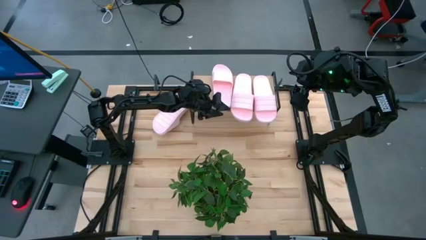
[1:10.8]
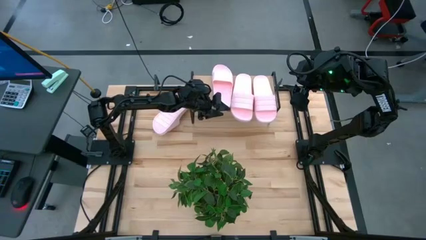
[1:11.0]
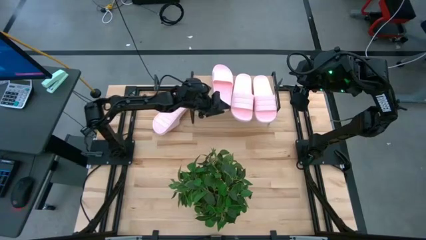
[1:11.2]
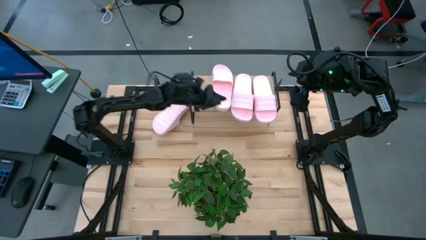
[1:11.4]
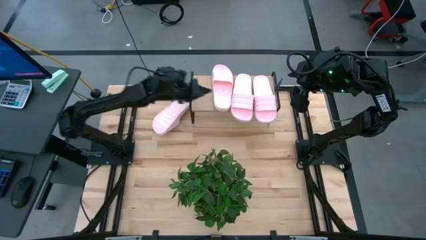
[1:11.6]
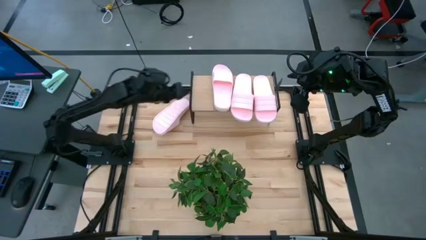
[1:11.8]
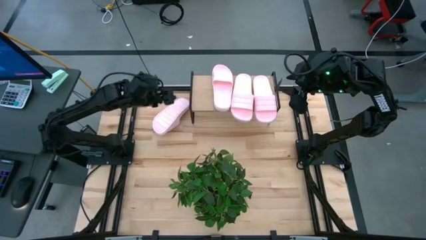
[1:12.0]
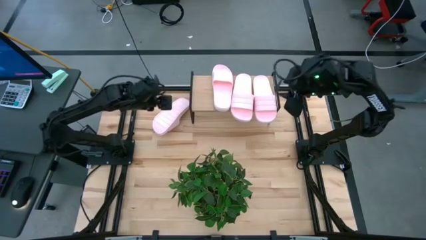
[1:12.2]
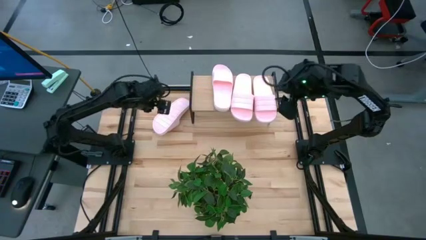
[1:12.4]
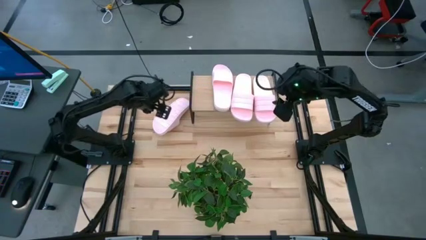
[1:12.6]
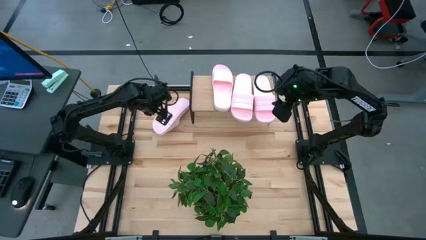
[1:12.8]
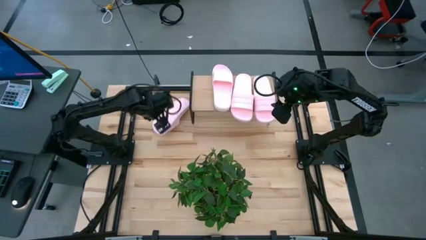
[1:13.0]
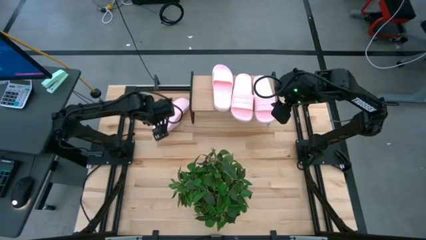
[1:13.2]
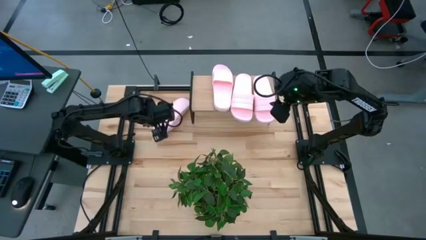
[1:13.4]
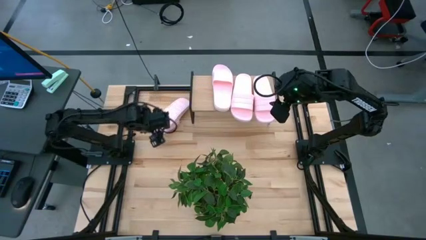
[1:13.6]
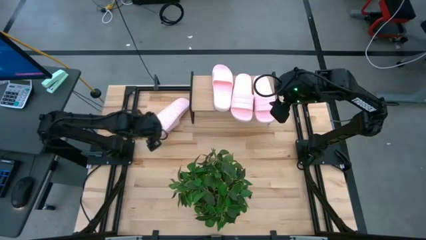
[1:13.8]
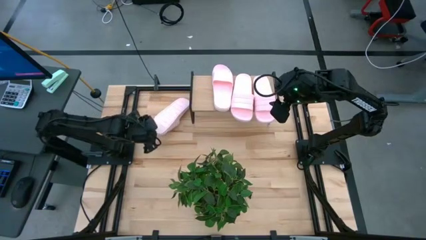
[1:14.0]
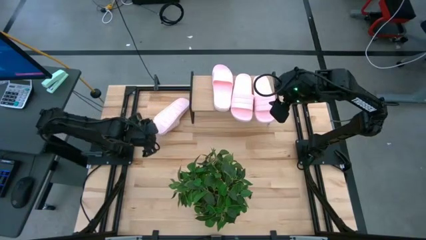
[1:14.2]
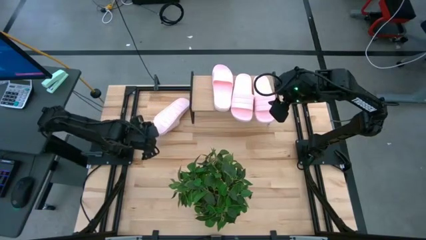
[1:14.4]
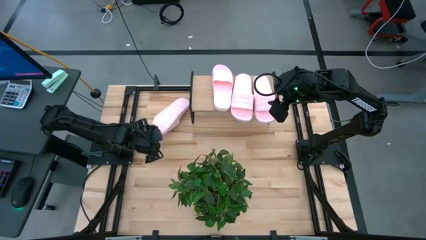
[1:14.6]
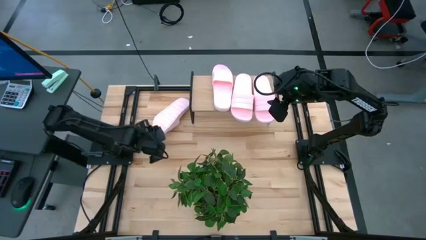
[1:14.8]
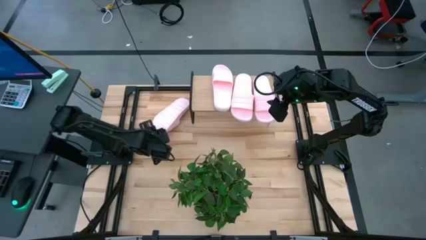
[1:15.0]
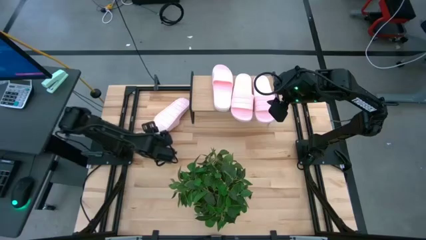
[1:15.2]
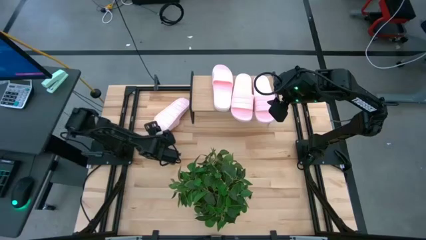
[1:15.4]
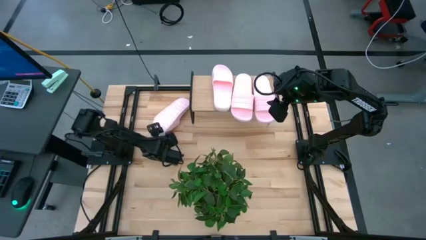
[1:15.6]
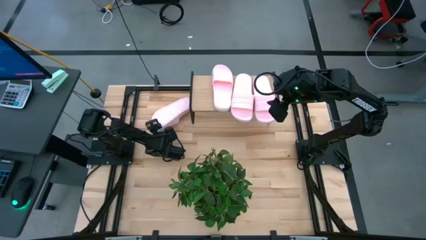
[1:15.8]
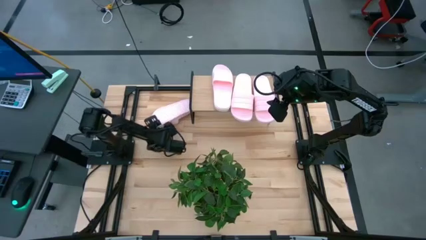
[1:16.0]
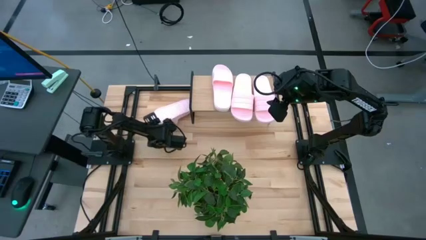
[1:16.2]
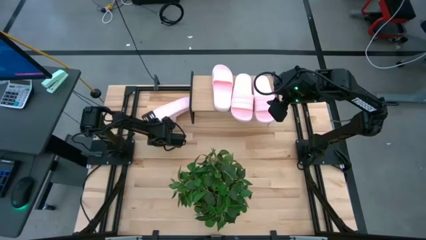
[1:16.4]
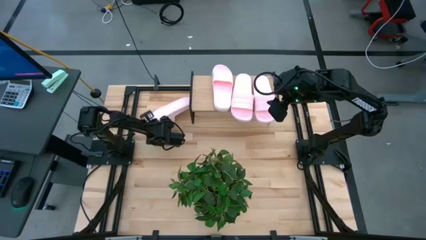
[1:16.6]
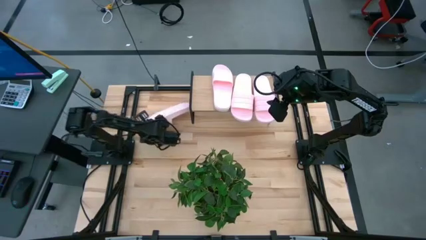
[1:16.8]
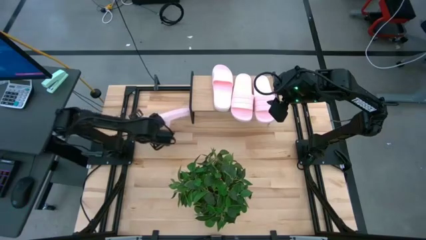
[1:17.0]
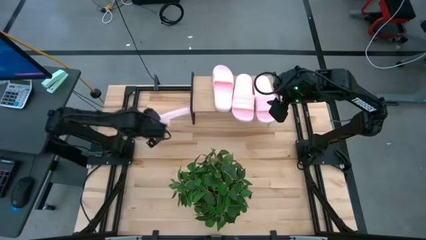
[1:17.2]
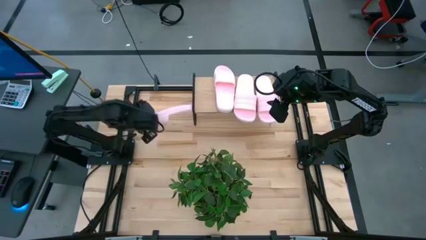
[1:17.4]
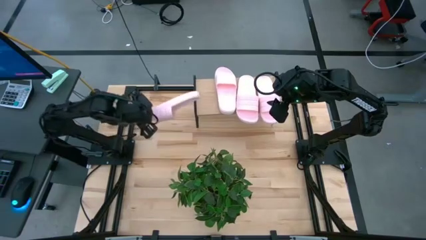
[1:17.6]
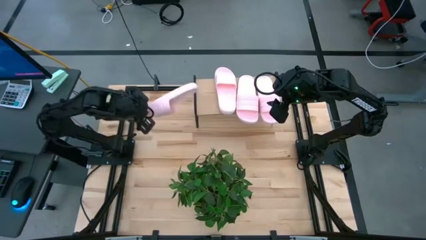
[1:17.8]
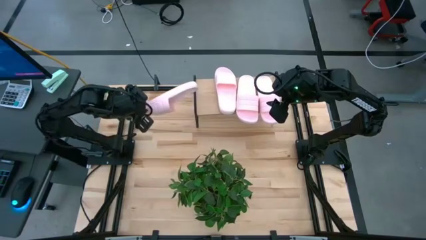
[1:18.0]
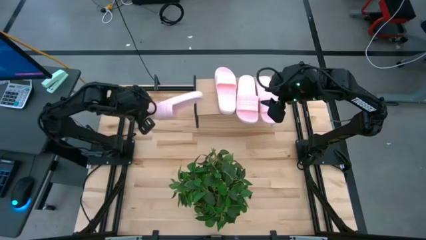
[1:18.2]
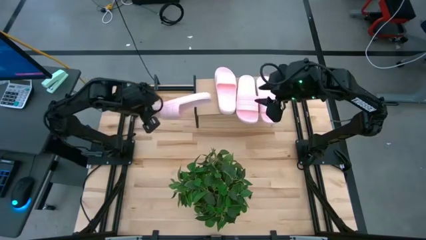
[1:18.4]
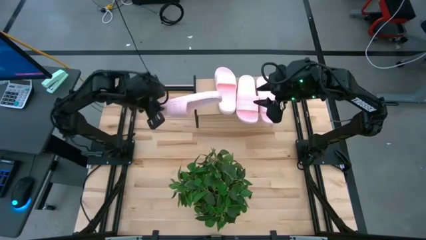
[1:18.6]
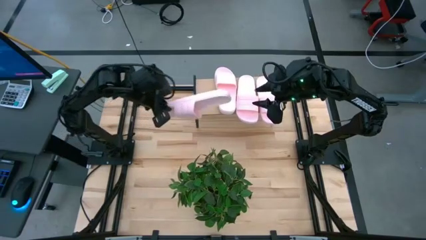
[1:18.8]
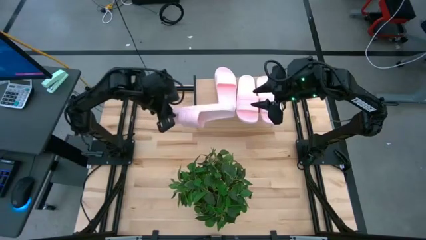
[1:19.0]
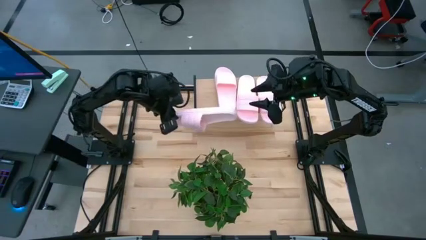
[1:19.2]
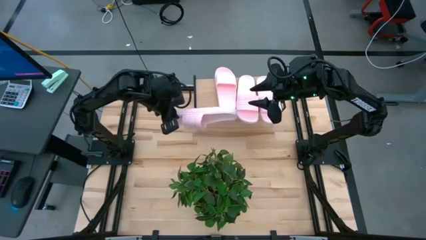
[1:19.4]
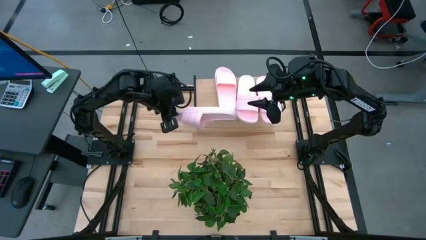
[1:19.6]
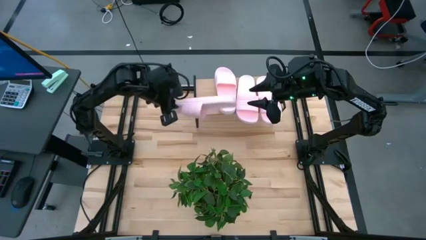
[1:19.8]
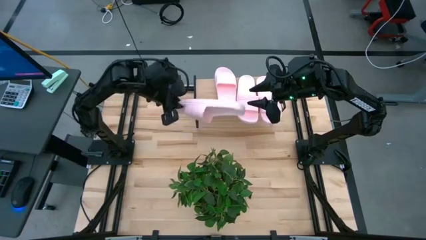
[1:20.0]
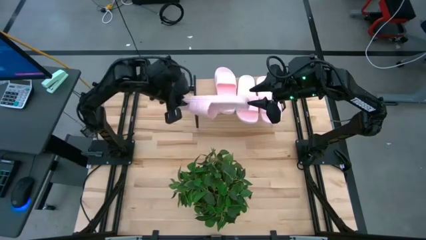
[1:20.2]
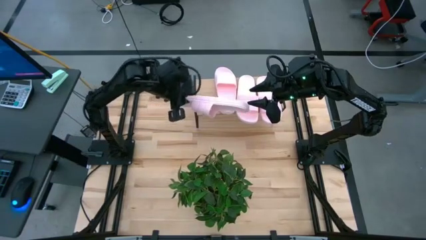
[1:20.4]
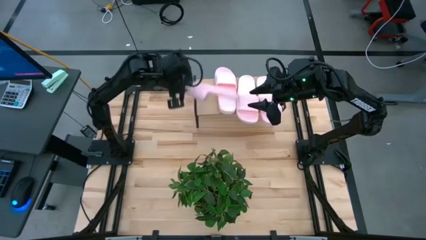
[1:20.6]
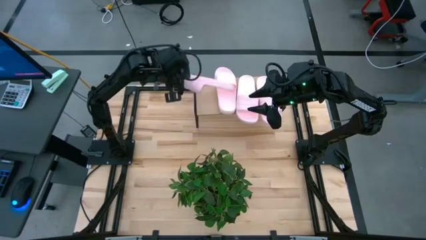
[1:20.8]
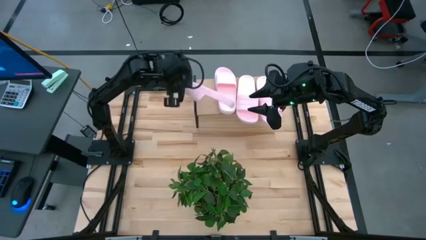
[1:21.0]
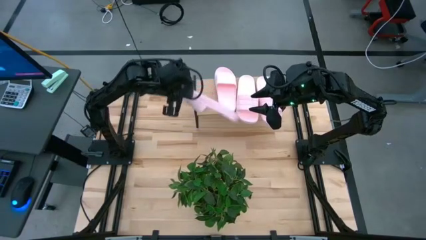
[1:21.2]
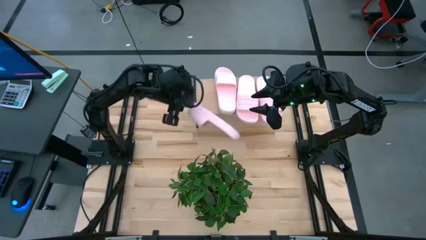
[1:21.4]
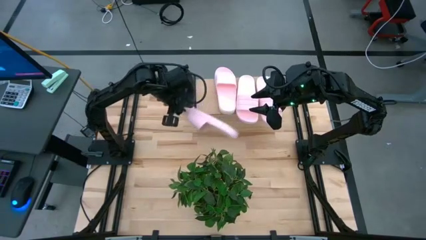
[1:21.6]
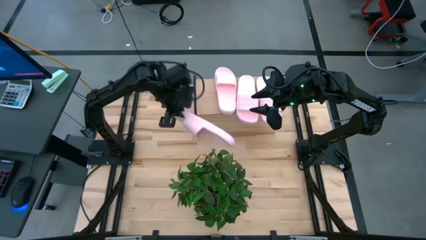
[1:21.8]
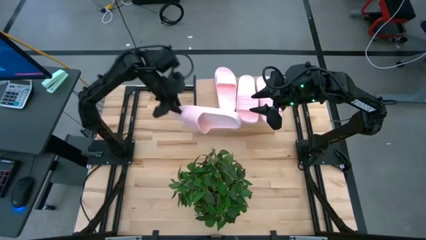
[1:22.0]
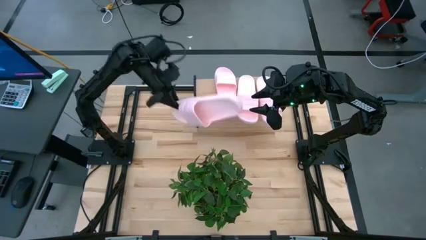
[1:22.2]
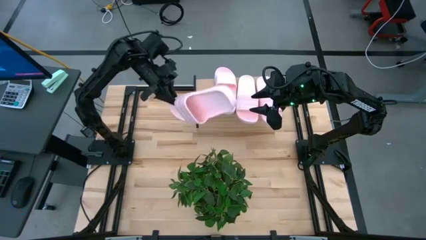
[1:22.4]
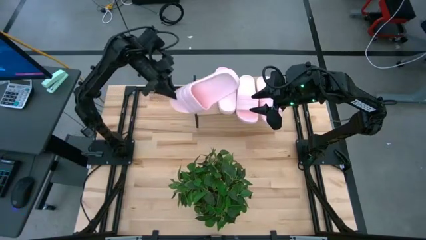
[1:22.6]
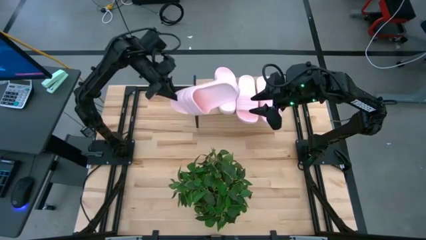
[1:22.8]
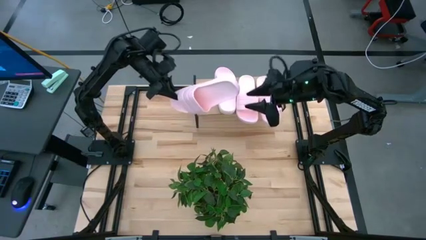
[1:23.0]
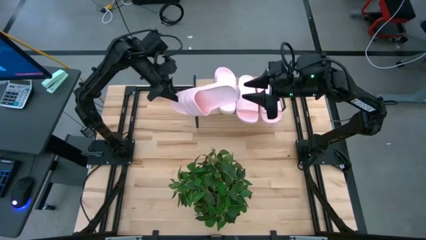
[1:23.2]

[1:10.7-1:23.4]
Task: Pick and place slides into the shelf
Put the slide on the shelf
